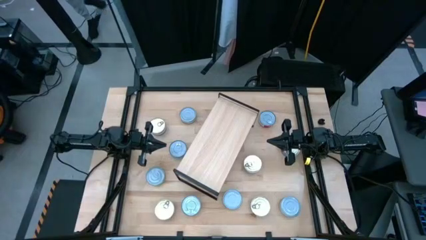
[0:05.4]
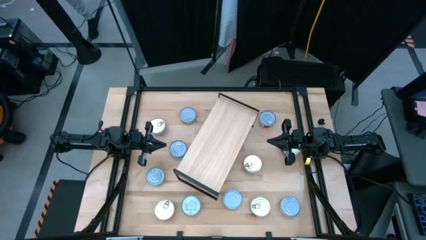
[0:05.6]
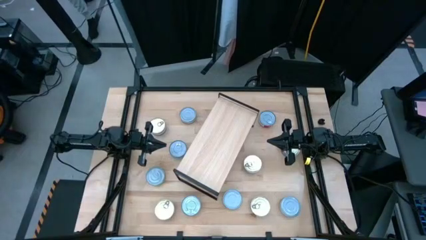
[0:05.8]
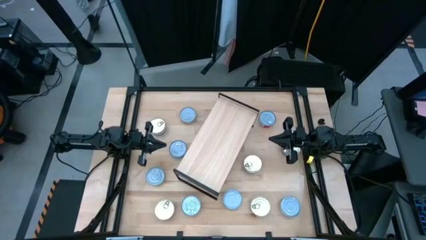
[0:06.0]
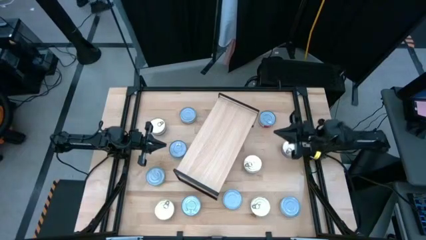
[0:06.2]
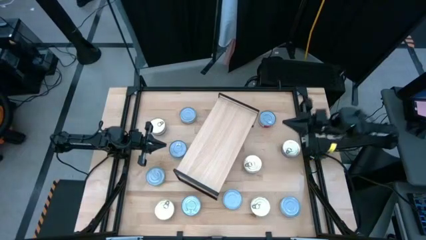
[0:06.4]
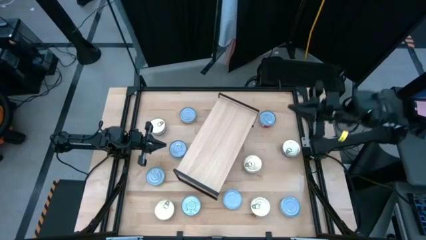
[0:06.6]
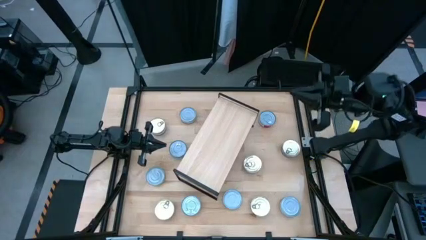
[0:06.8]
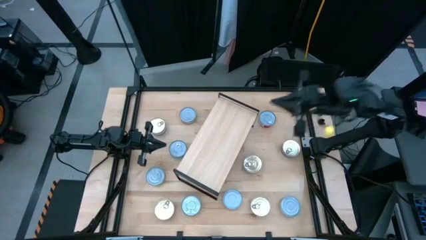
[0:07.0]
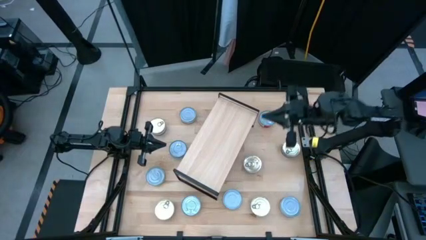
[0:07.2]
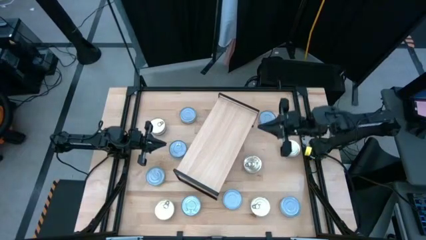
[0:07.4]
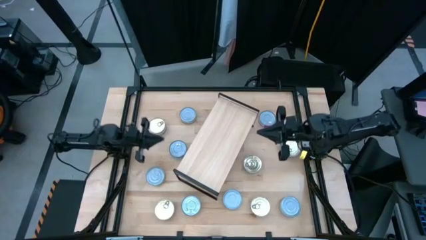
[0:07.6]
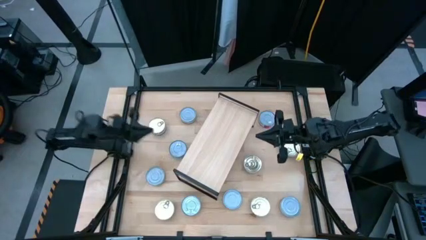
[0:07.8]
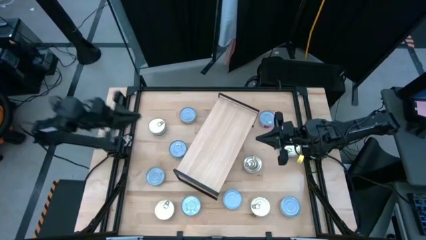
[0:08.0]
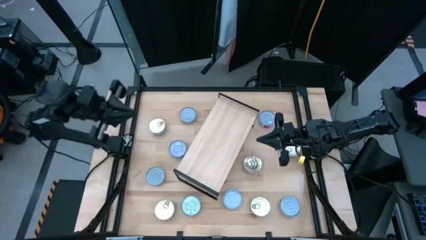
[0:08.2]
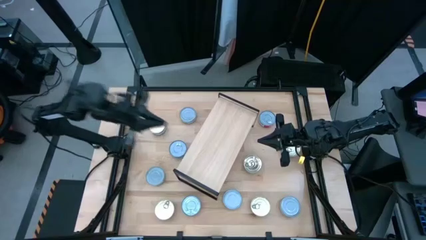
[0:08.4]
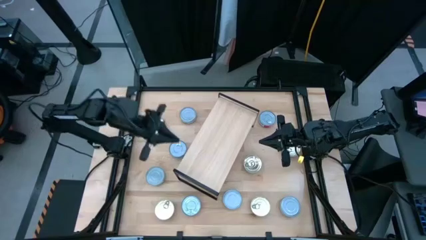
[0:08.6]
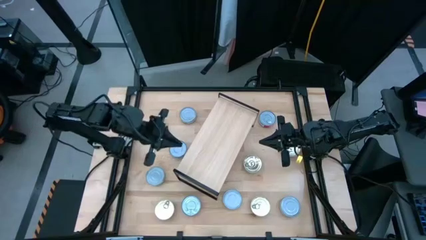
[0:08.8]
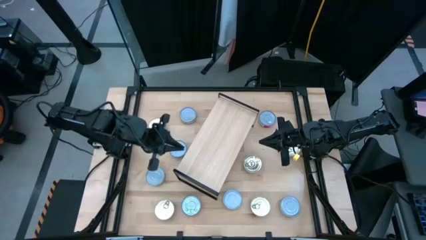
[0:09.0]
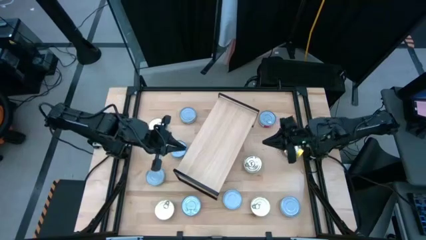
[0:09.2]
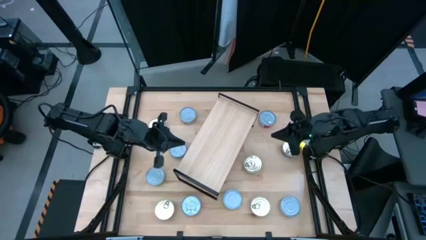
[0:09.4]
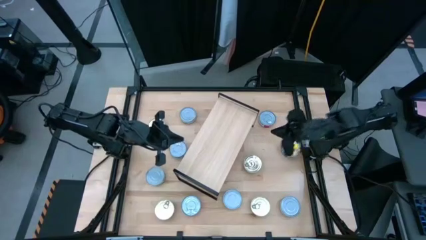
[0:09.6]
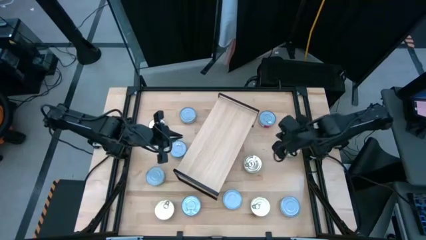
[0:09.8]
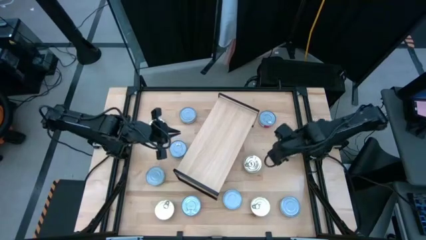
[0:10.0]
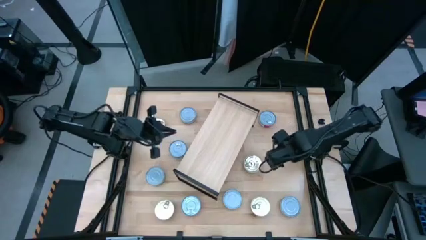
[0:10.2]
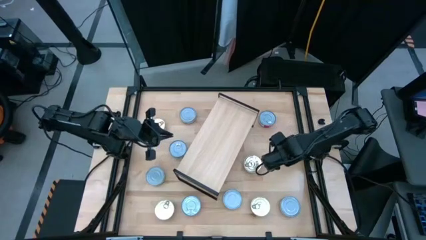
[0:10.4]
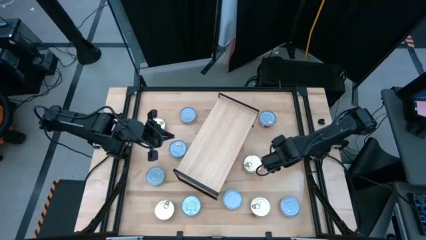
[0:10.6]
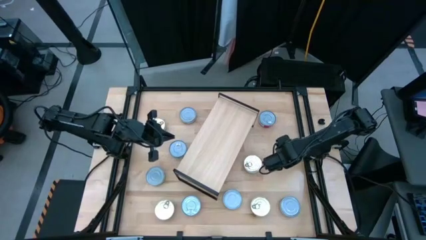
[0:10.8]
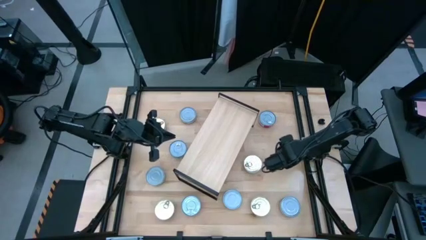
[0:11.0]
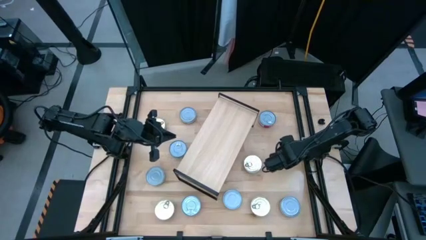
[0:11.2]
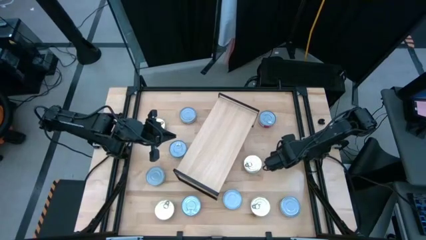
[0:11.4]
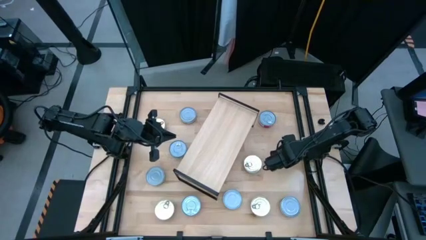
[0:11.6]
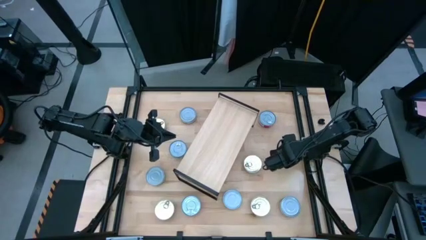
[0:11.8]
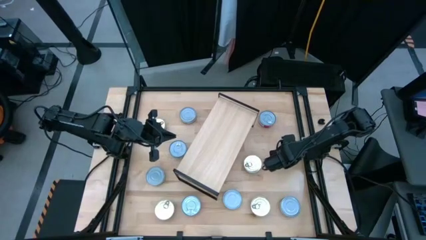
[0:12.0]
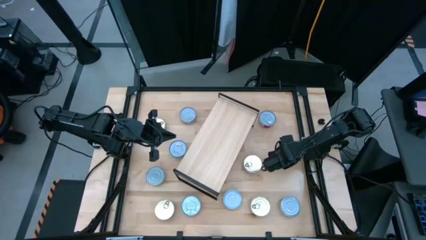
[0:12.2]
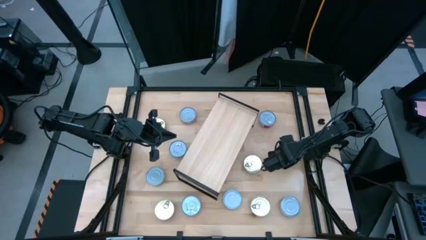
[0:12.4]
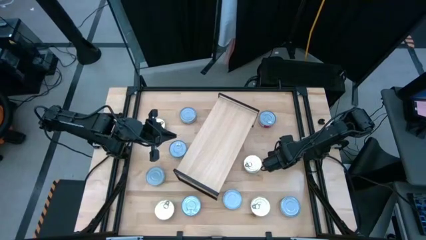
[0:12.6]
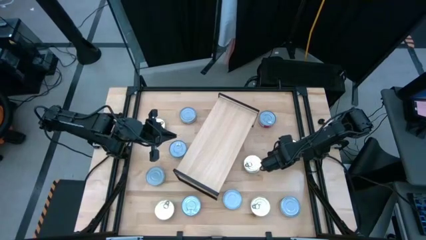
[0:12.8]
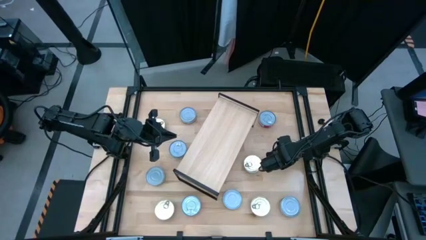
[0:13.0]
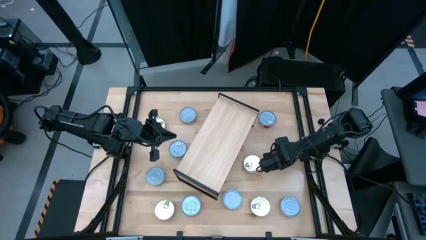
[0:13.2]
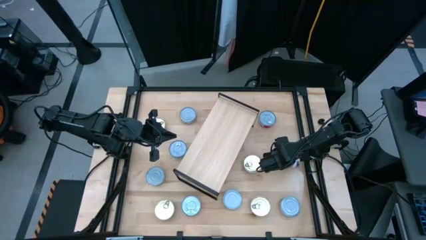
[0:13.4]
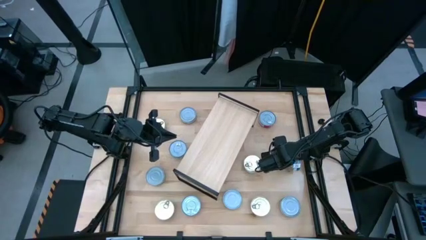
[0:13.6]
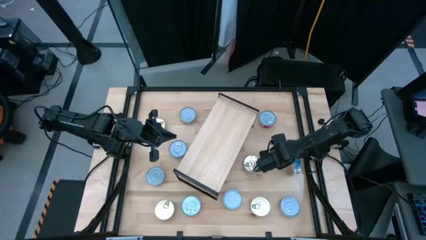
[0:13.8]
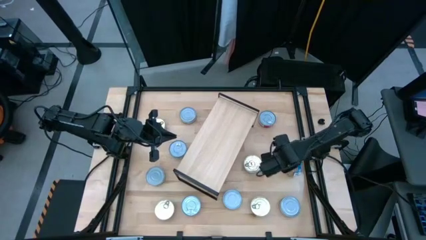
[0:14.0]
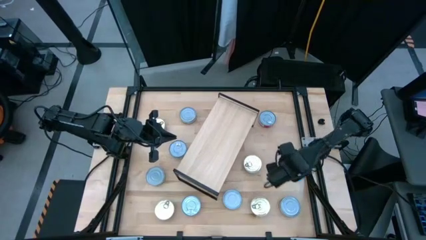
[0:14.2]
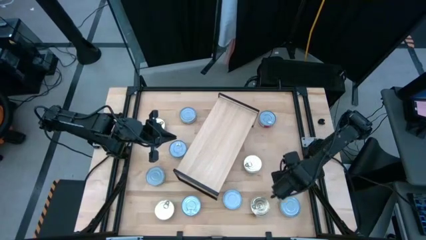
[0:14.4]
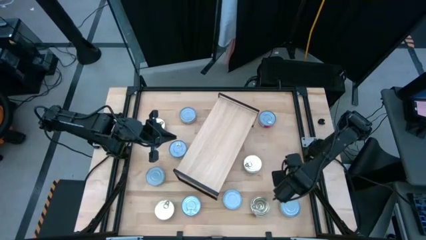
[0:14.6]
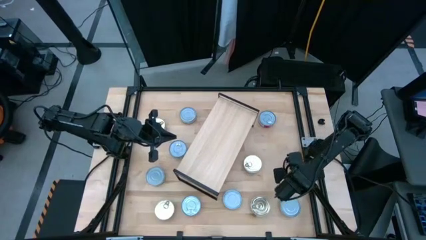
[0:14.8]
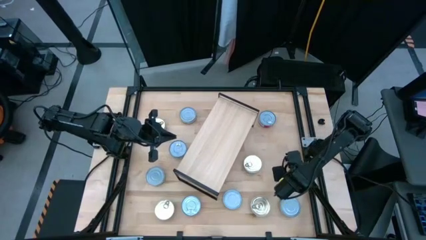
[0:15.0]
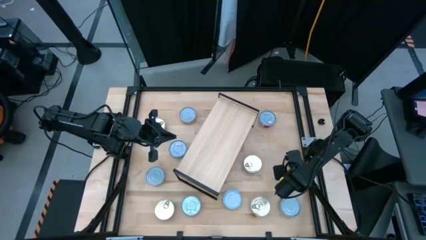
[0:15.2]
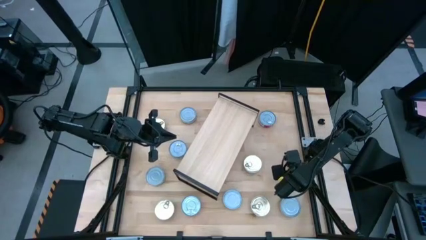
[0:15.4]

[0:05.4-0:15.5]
Task: Stack canned seafood by type on shelf
Put the blue tuna can on the shelf
